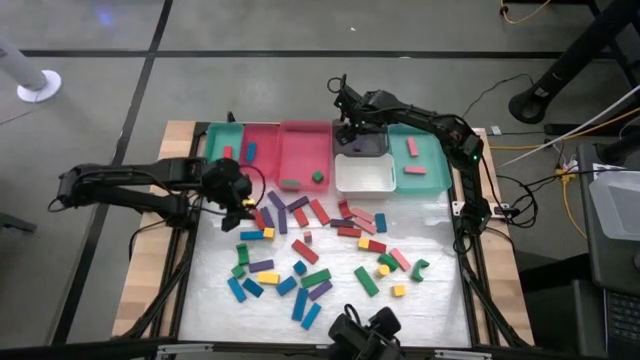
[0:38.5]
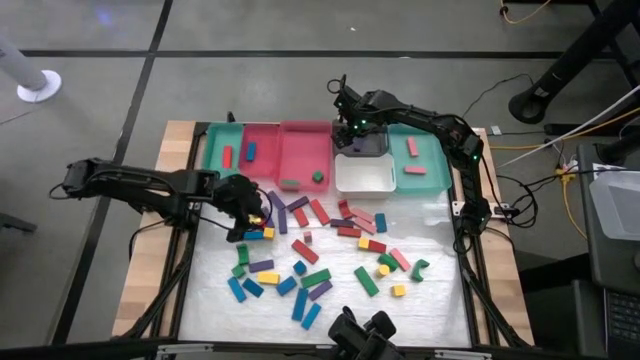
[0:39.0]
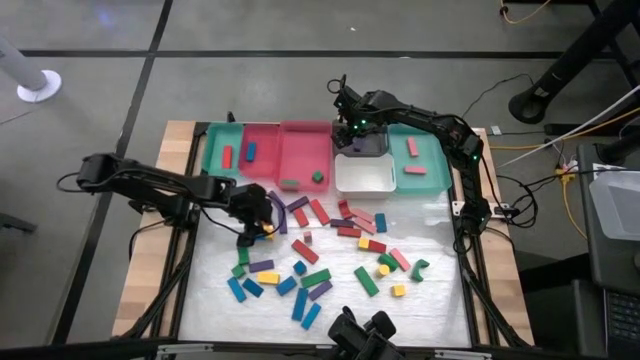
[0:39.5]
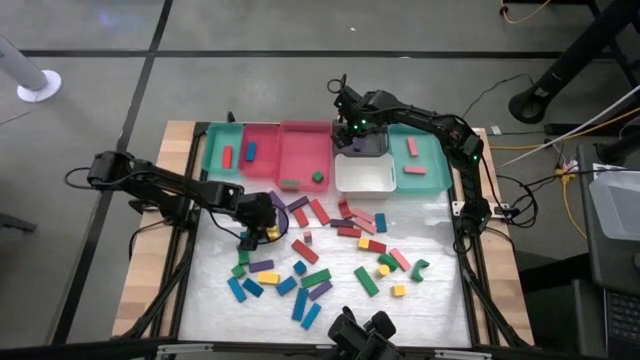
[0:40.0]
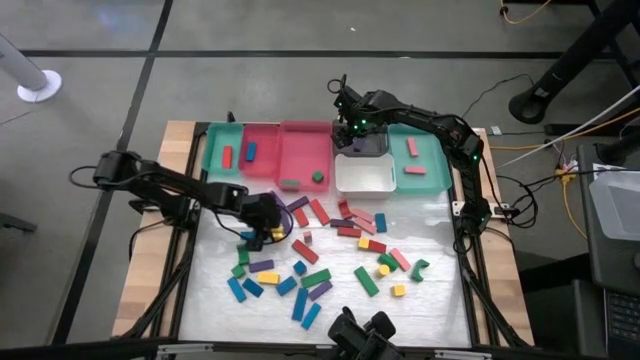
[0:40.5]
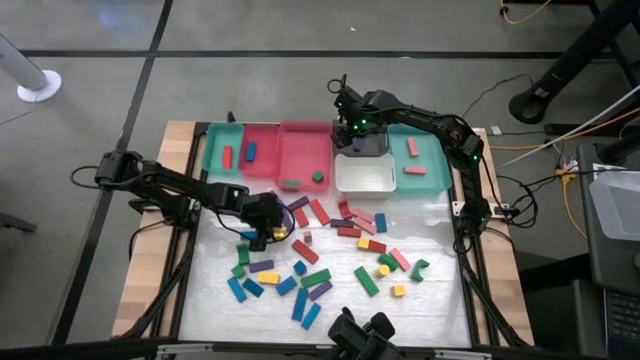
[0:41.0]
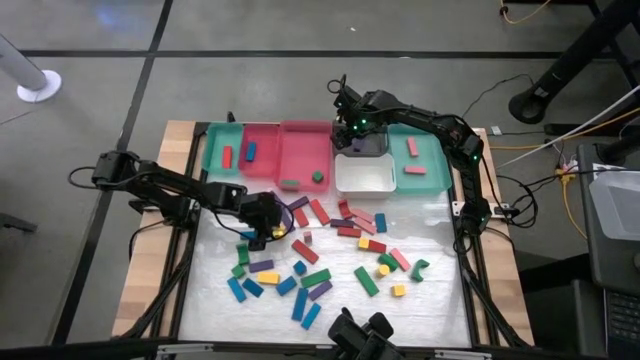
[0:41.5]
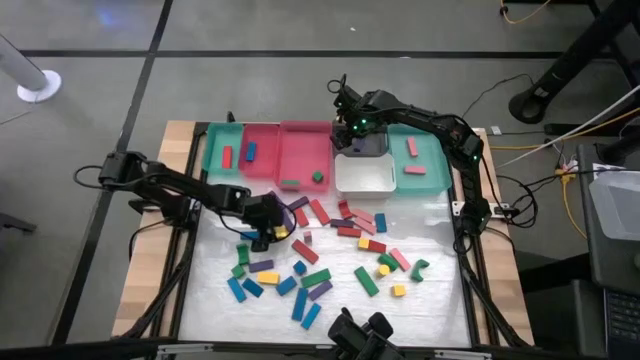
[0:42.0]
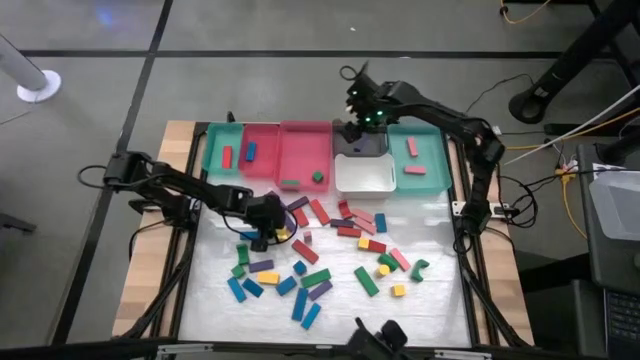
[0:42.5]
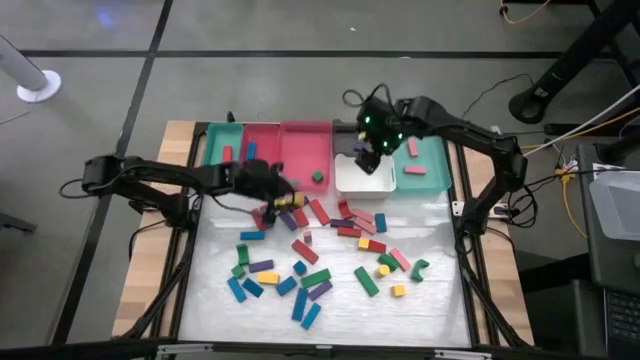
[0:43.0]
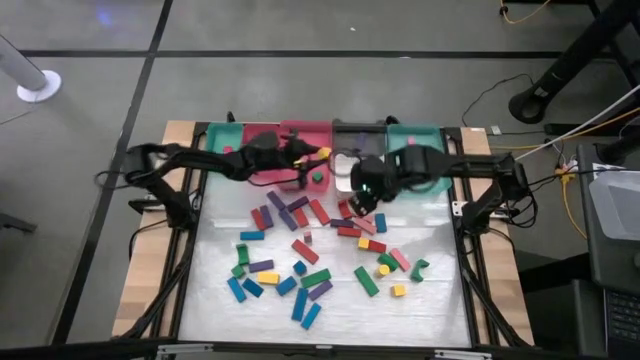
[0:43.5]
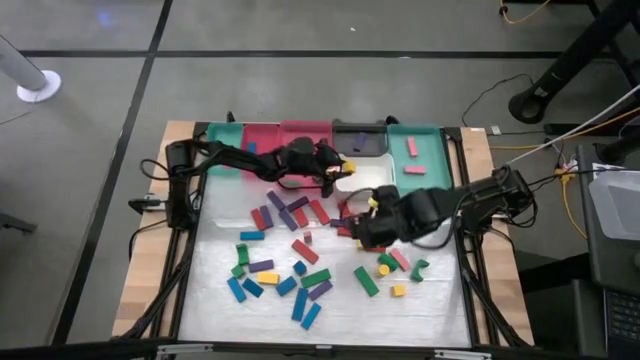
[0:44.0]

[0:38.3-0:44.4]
Task: Sort blocks
Put the yellow block into the white bin

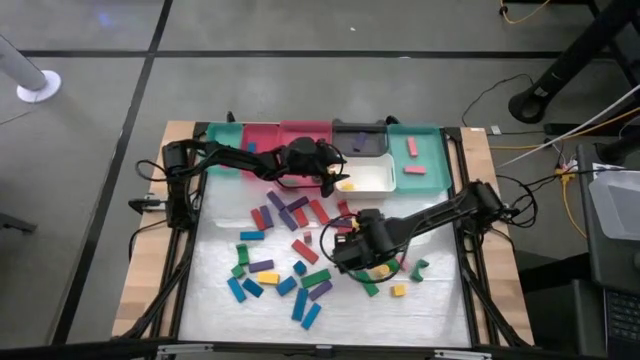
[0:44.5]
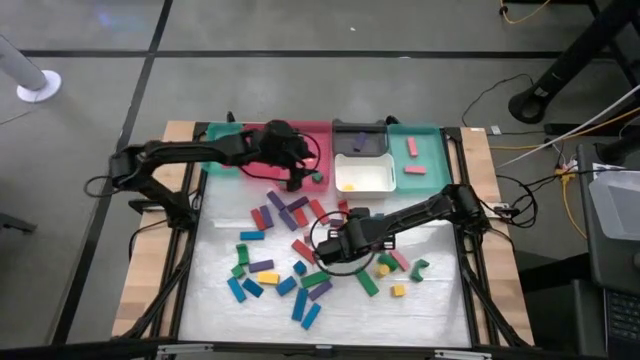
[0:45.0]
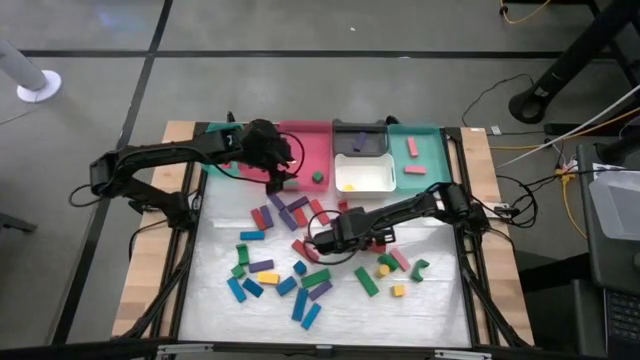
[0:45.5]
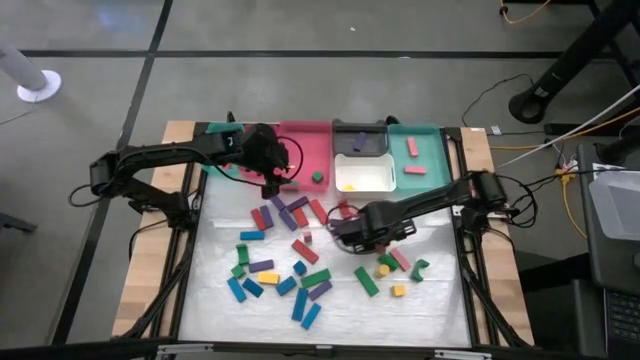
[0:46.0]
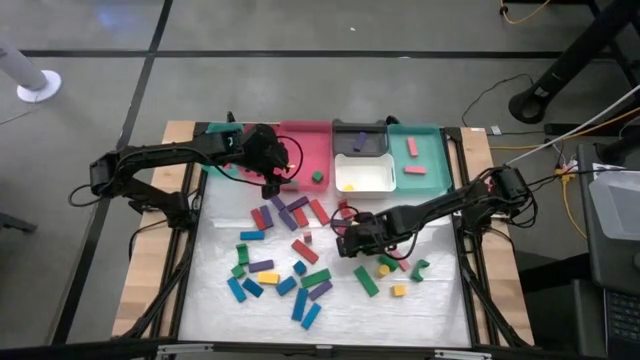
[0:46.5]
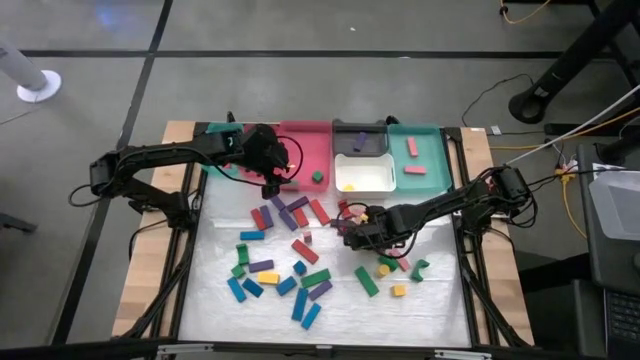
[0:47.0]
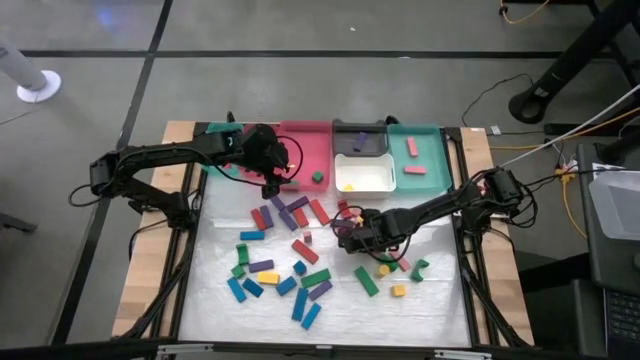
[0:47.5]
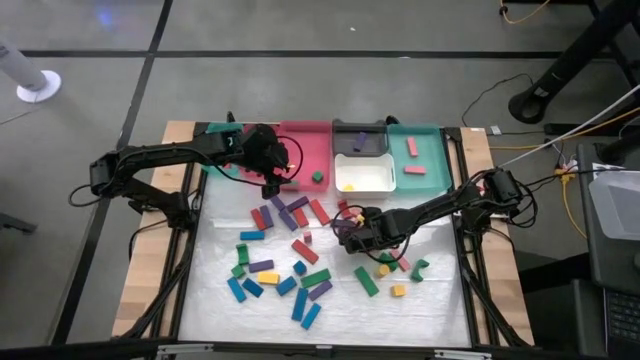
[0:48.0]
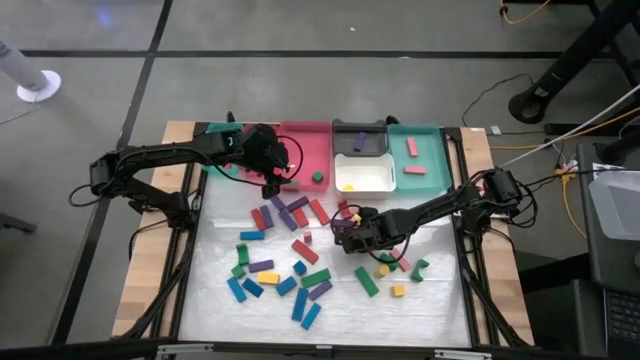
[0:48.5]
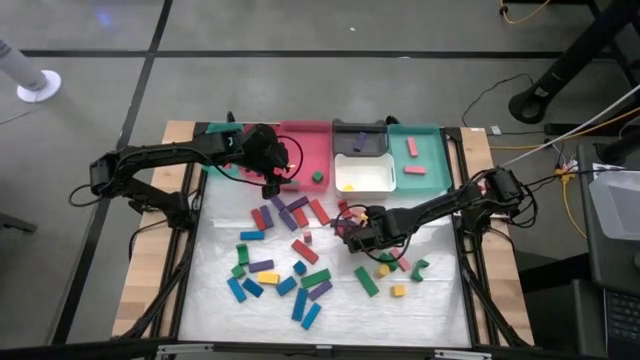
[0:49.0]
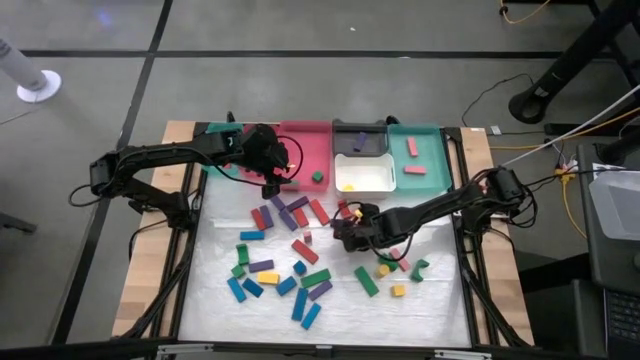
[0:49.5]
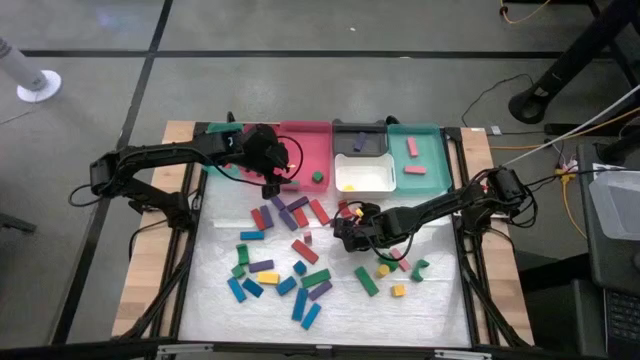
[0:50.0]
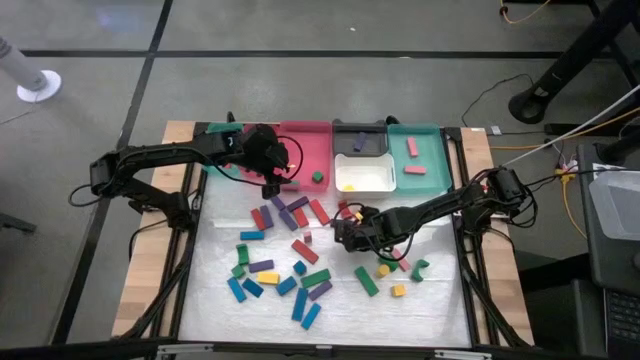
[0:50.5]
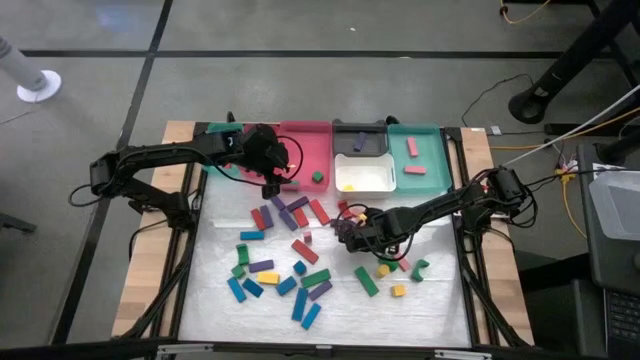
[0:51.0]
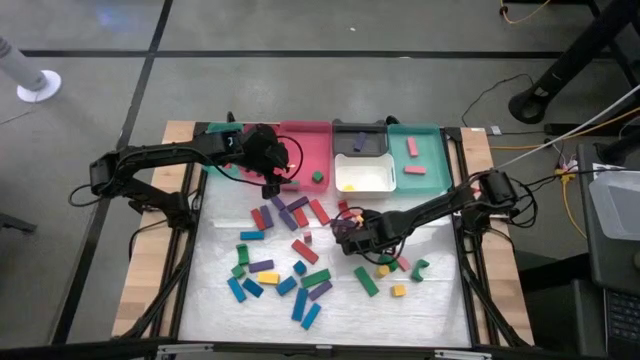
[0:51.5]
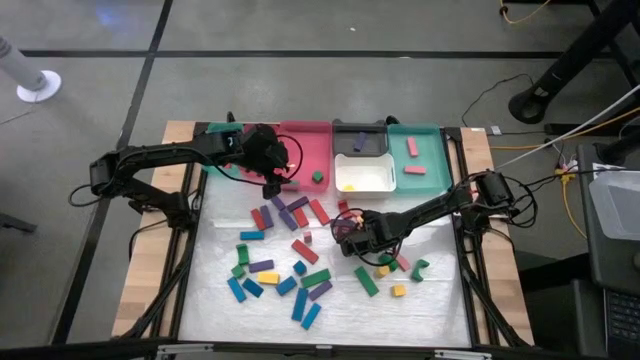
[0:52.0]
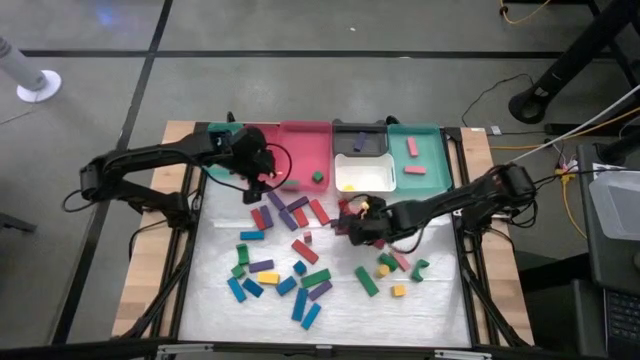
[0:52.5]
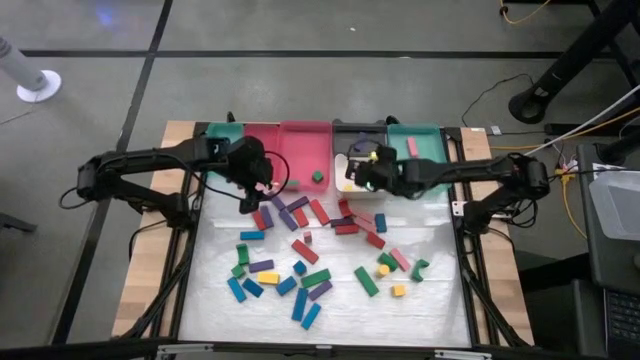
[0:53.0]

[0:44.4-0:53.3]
Put the yellow block into the white bin

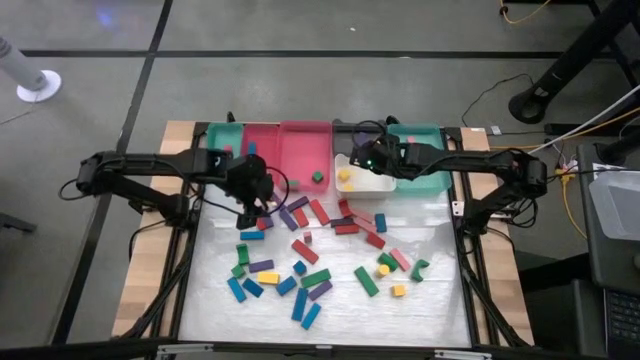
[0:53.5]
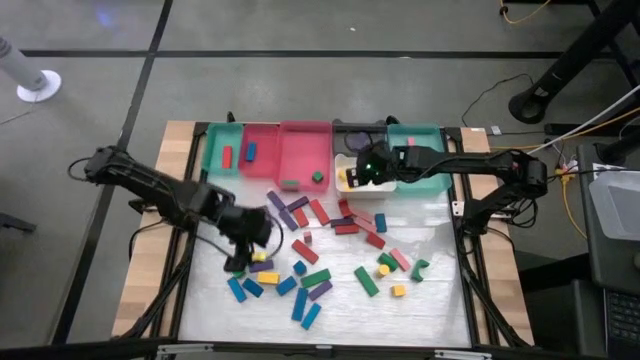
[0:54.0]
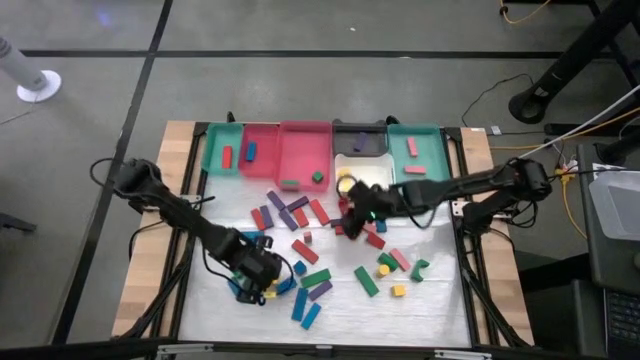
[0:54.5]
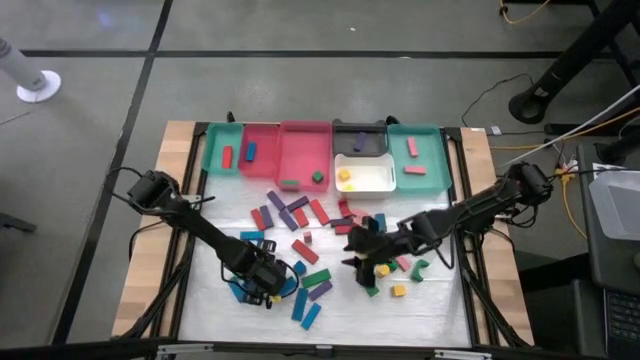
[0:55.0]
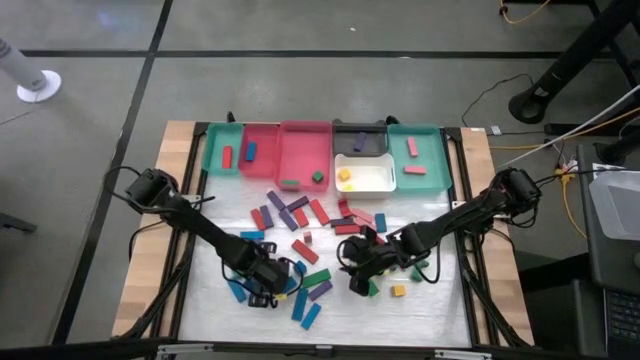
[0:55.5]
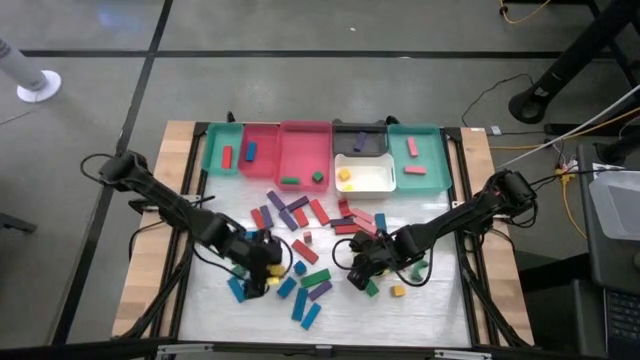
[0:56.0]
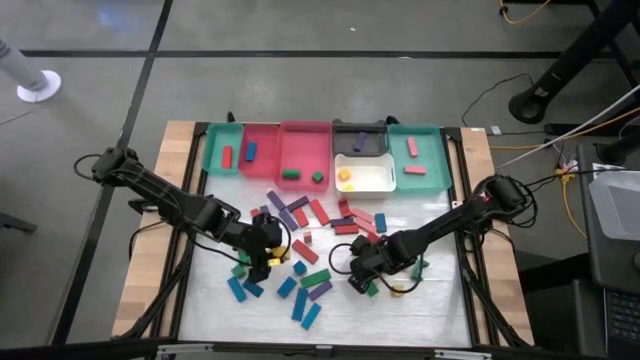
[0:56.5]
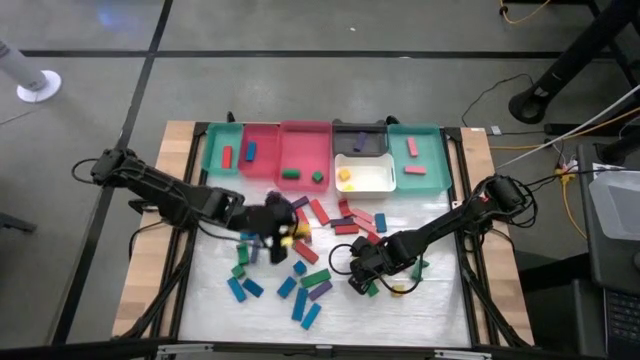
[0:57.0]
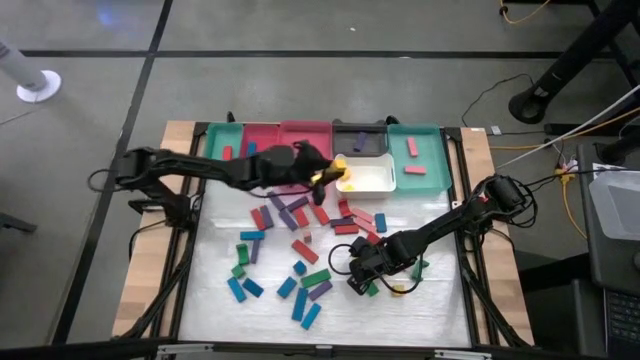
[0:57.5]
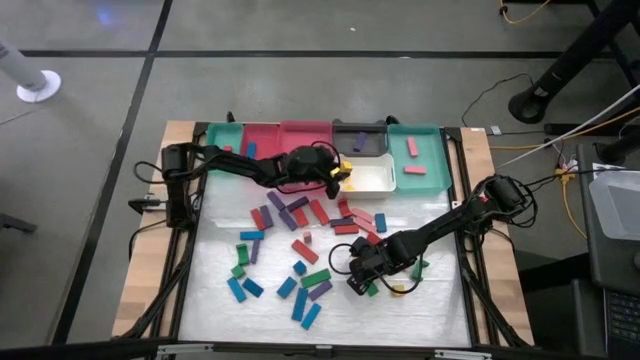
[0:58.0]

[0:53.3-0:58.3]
Put the yellow block into the white bin

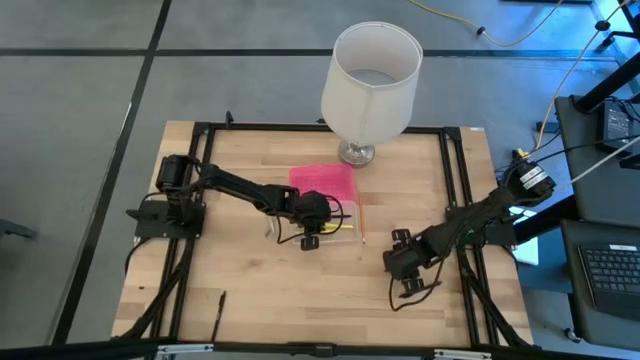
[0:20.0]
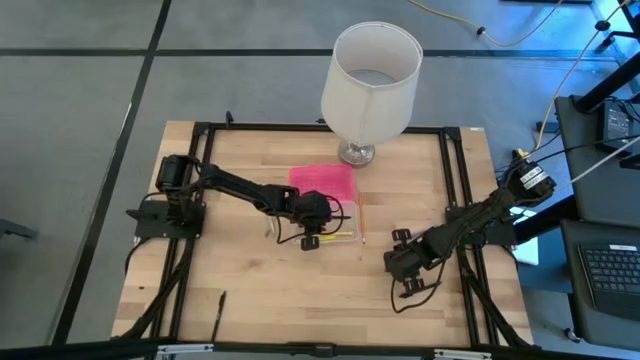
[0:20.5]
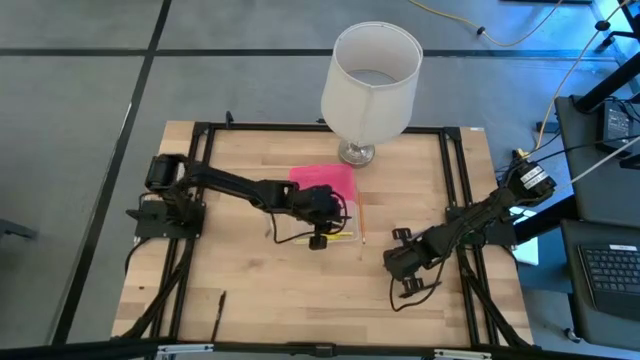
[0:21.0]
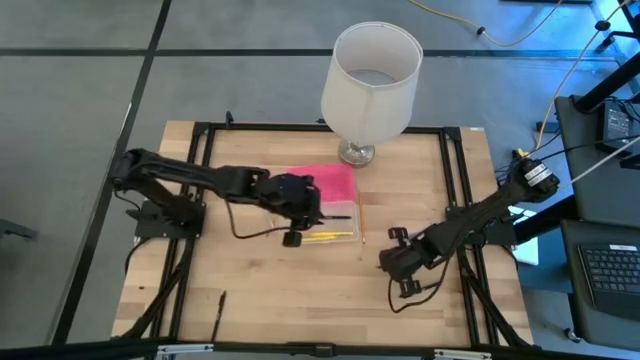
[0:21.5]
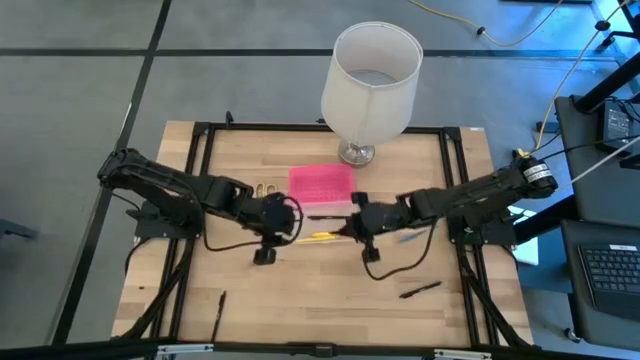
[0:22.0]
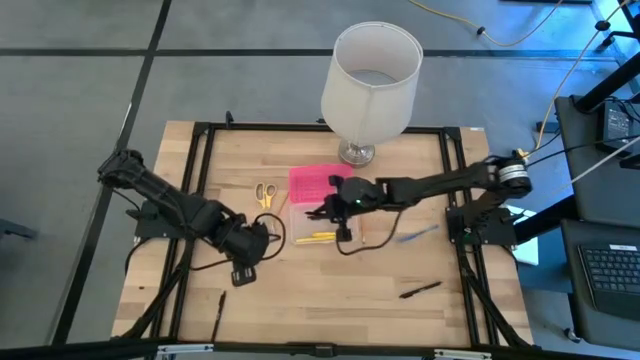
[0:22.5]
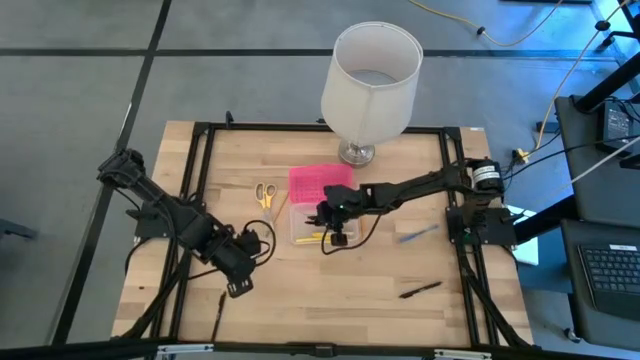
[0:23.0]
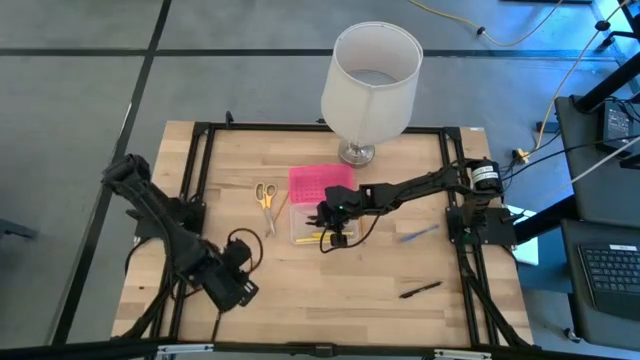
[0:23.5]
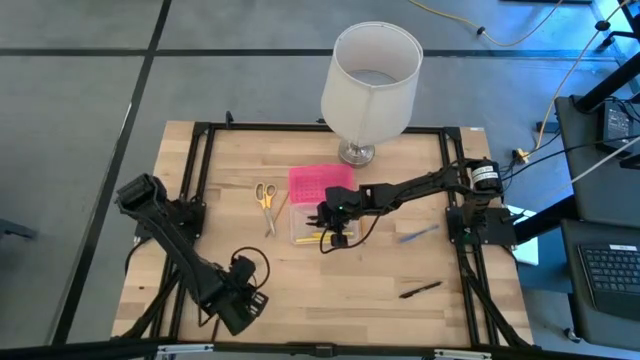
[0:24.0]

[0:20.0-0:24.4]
Task: Pick & place school supplies into a supply box
Put the black pen into the supply box
